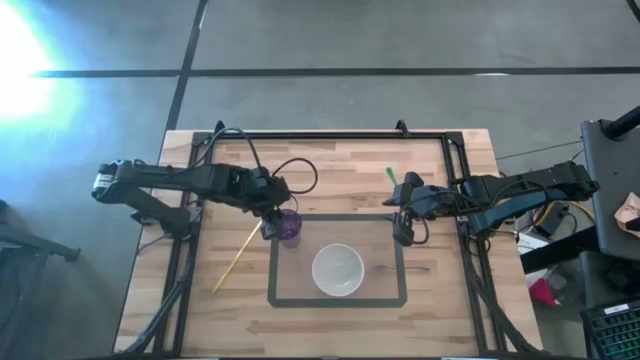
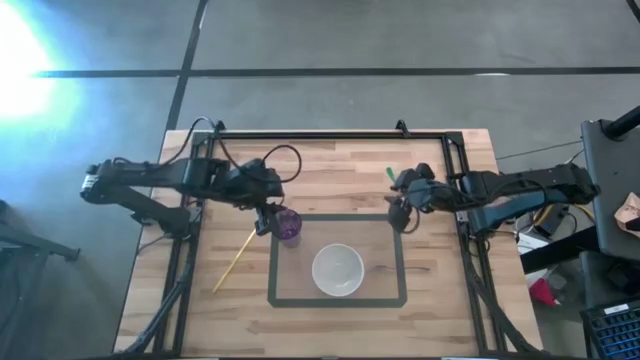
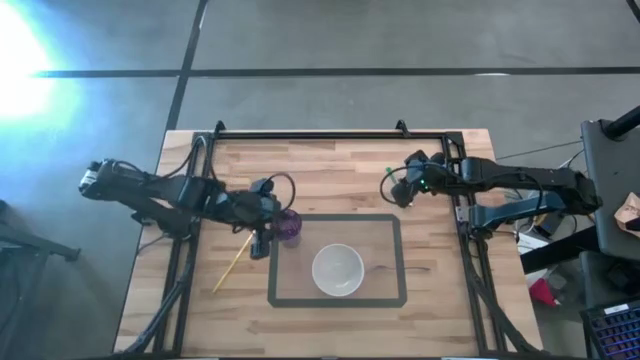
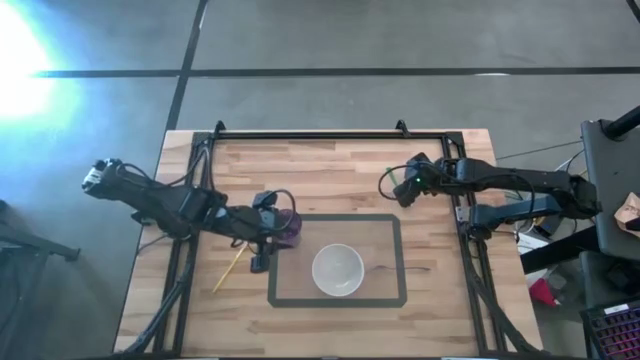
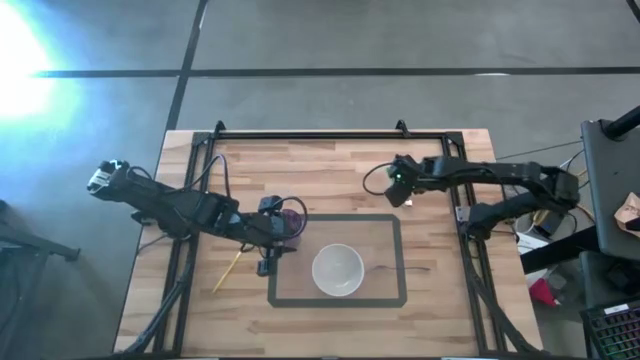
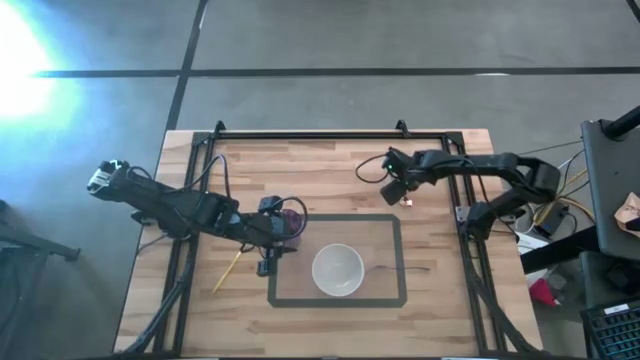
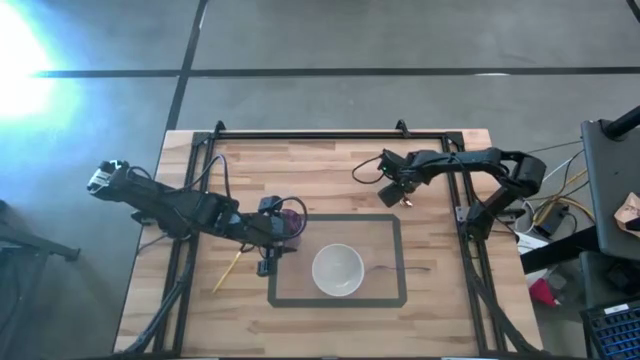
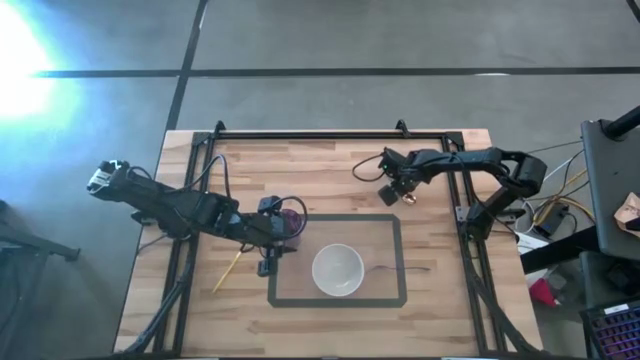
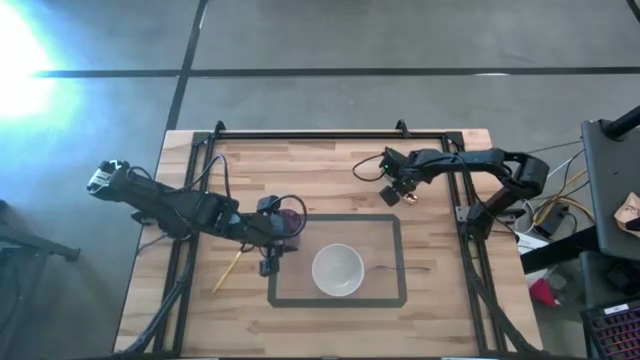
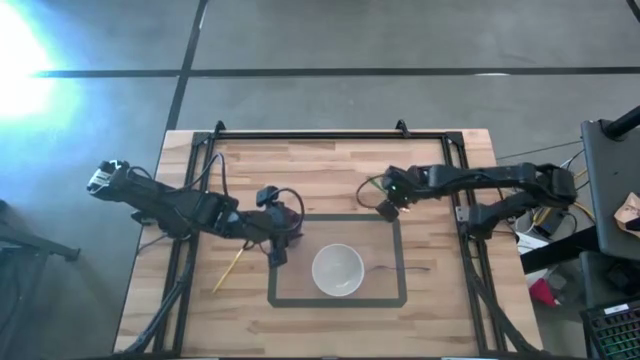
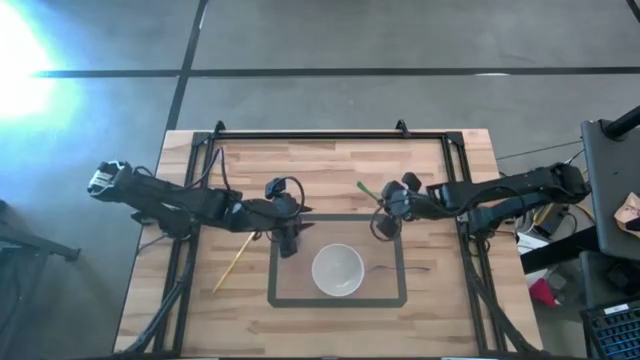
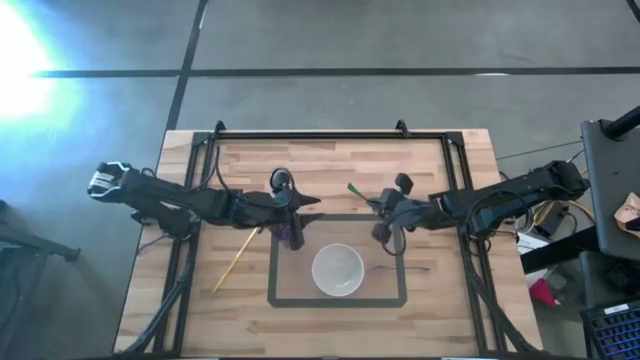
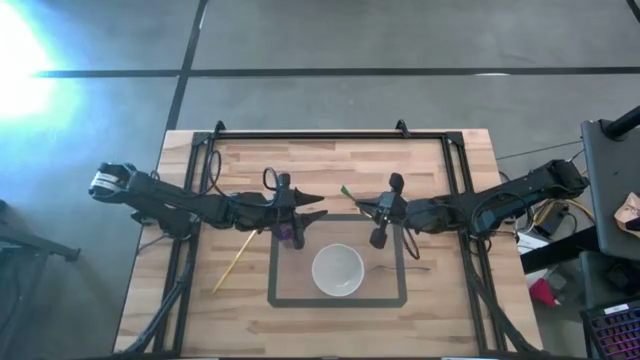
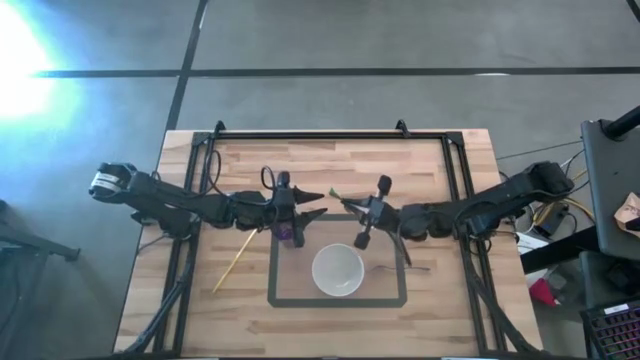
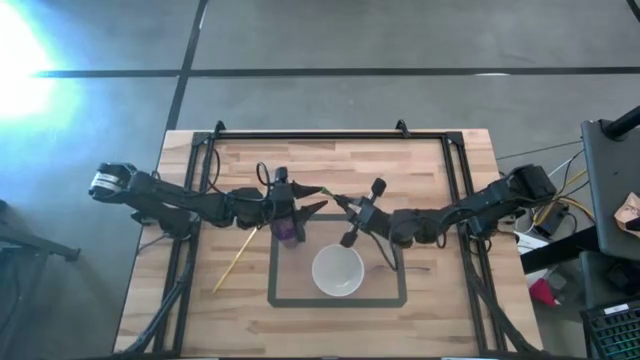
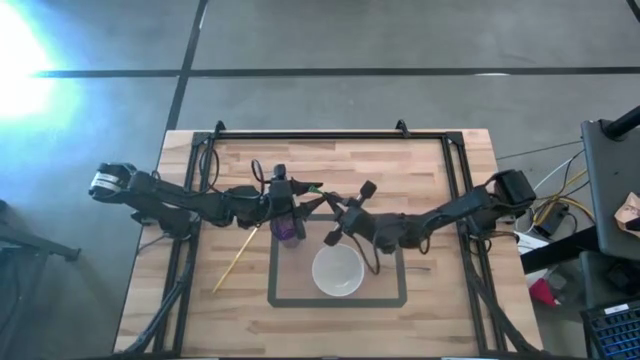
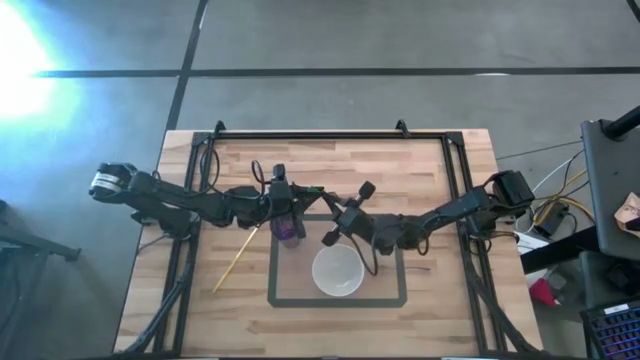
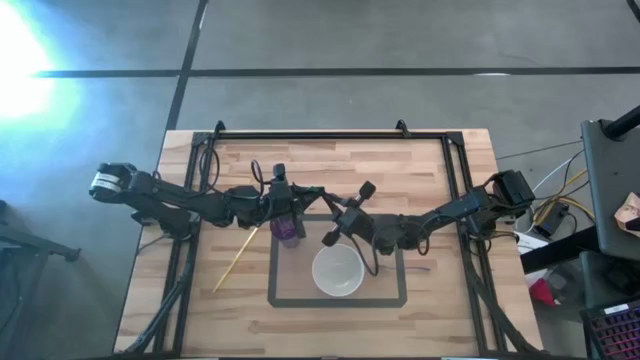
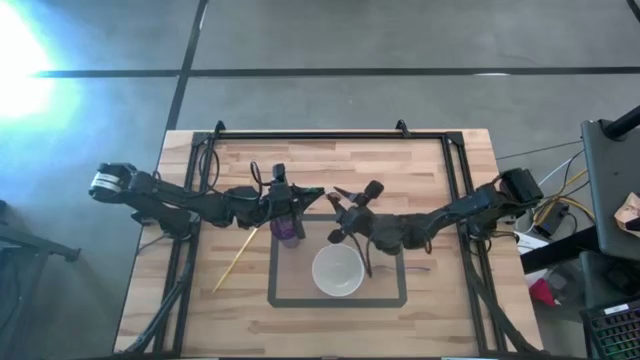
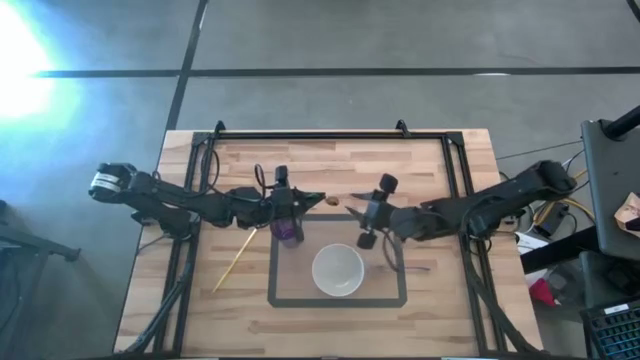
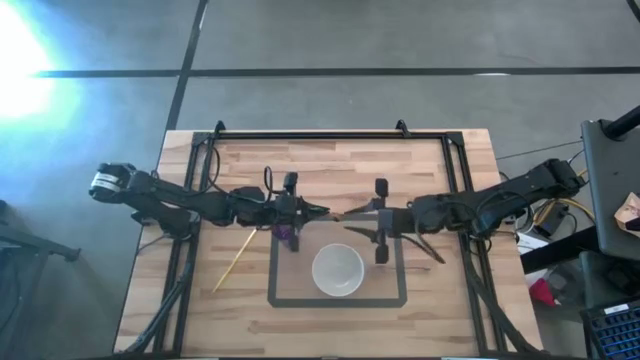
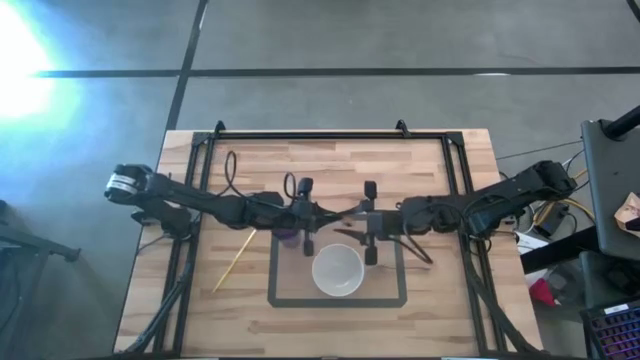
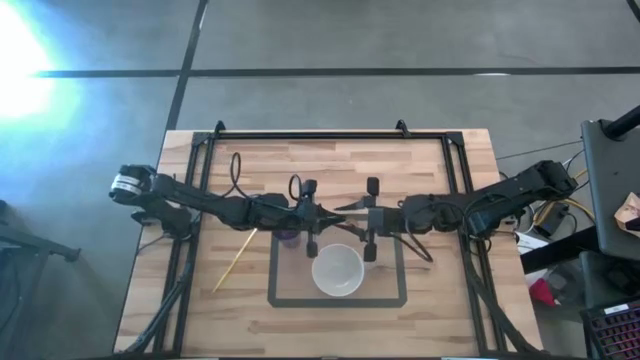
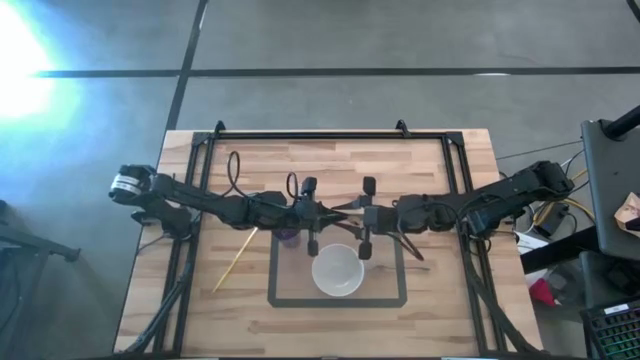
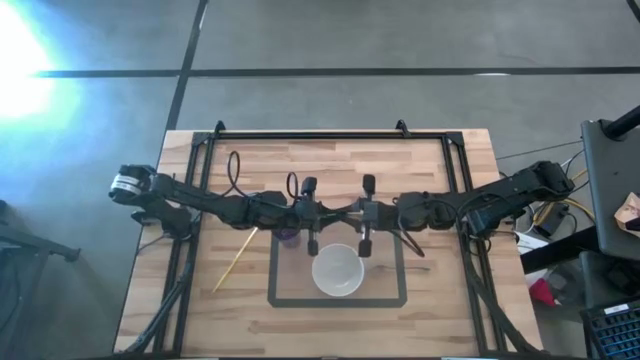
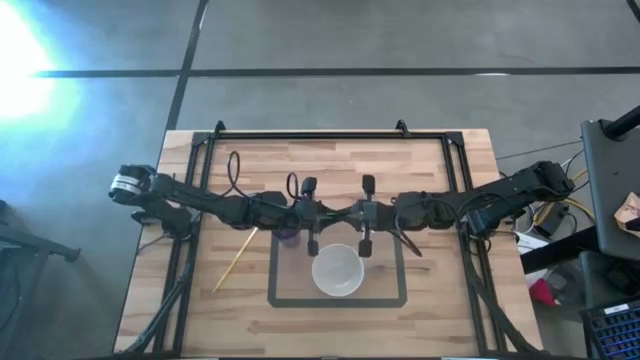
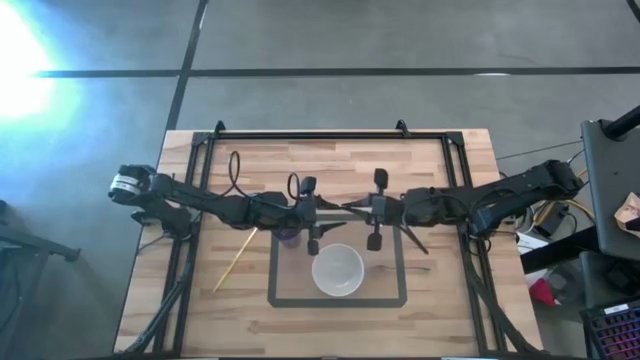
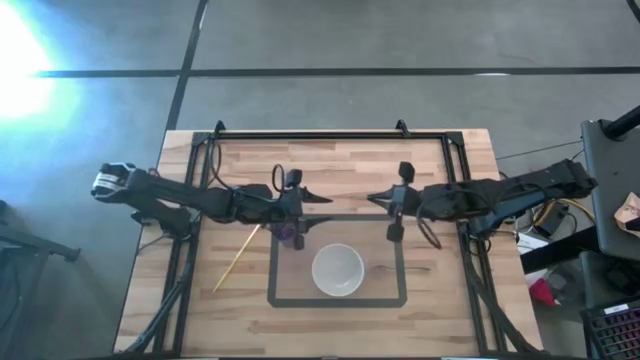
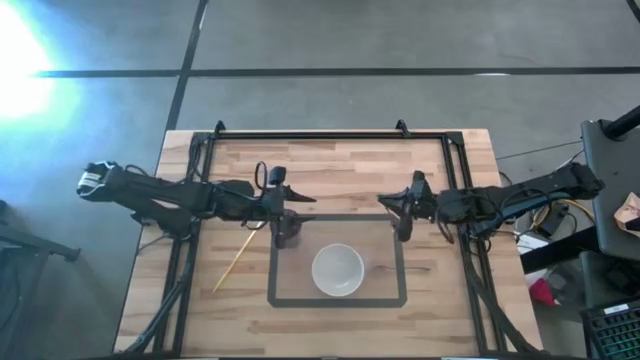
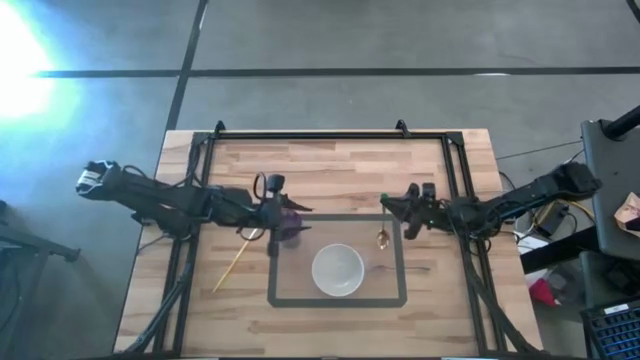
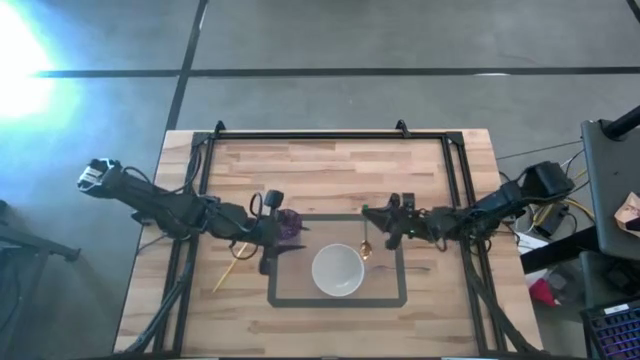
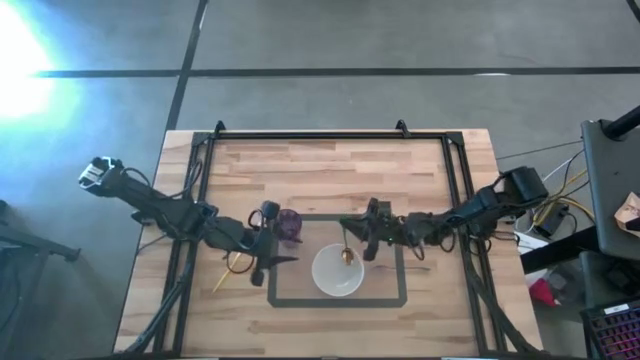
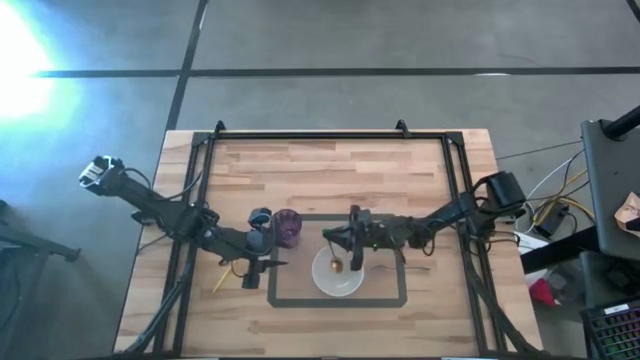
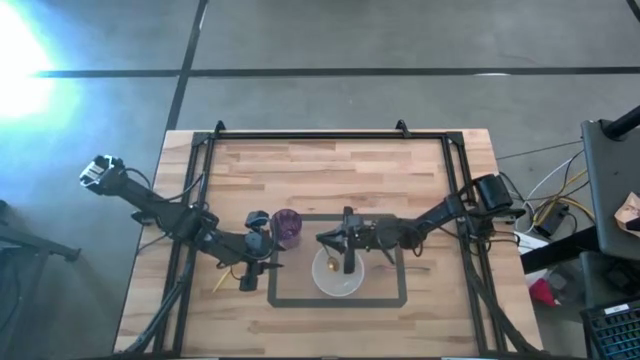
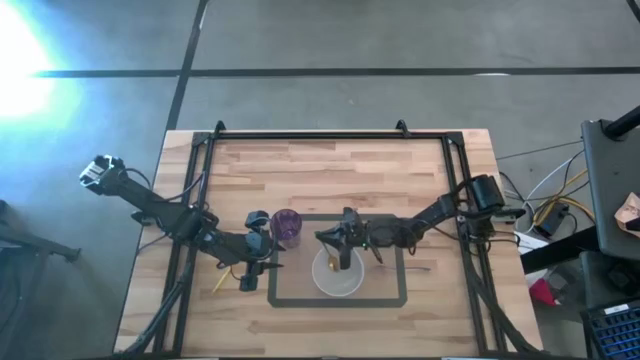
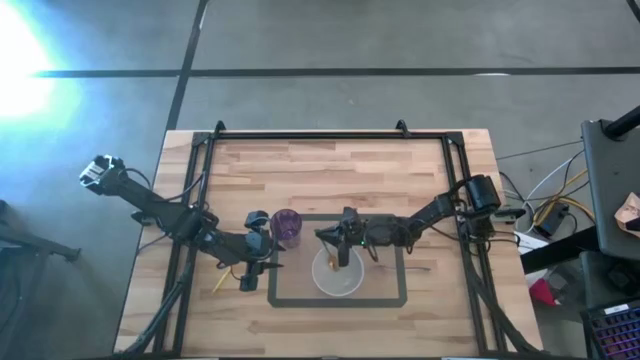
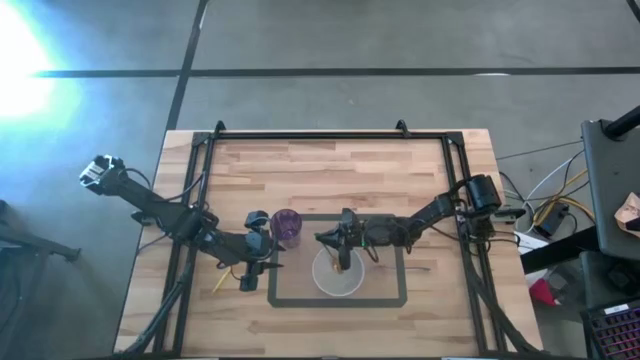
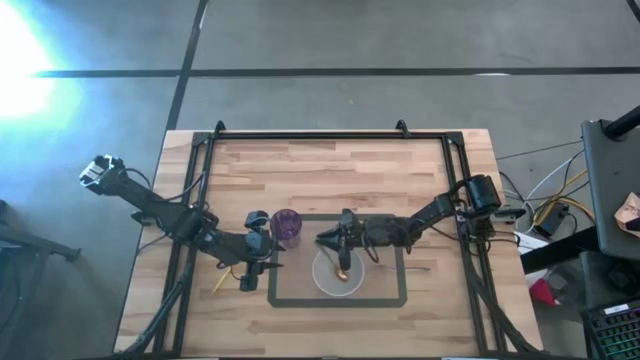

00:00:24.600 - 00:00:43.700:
Task: Pick & Place Utensil
Put the green spoon into the white bowl on the transparent mat
